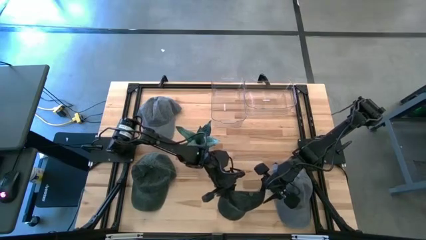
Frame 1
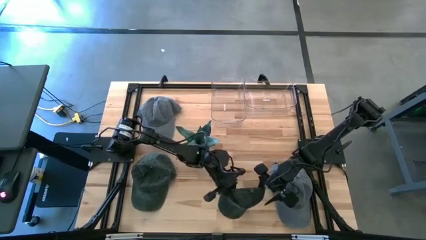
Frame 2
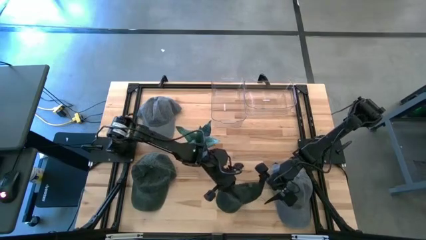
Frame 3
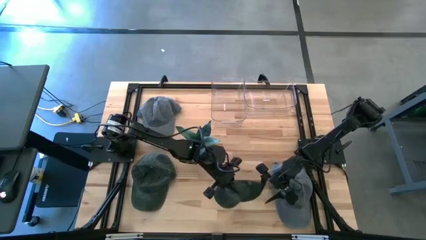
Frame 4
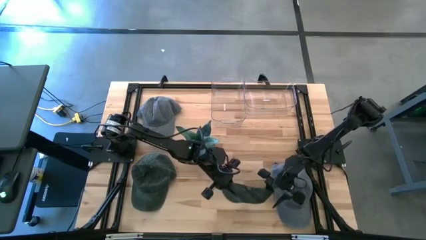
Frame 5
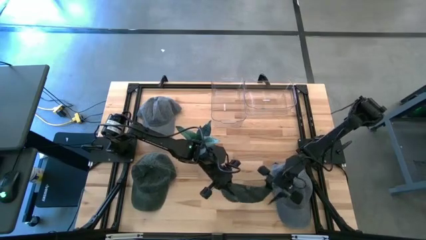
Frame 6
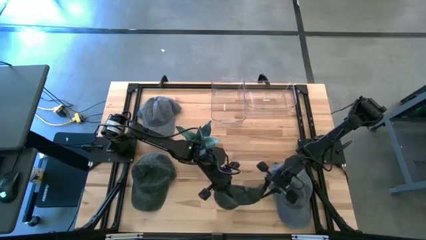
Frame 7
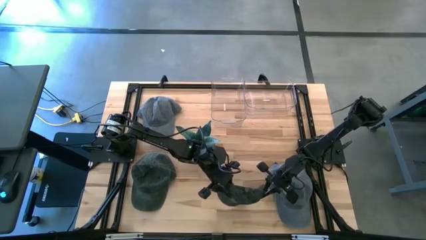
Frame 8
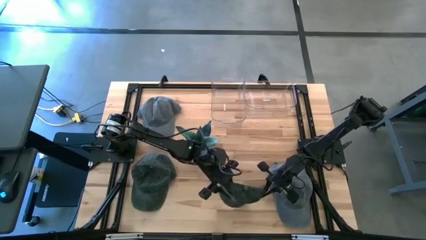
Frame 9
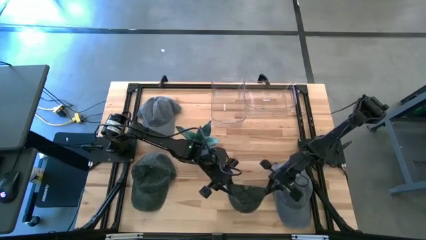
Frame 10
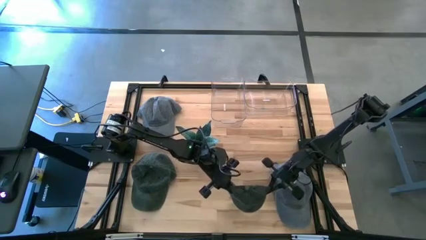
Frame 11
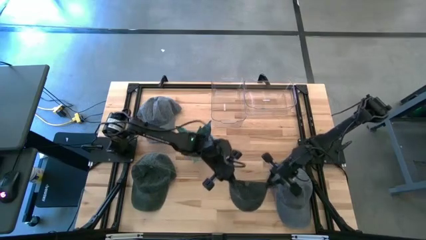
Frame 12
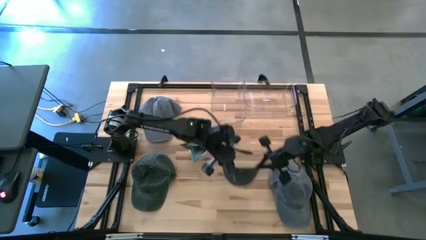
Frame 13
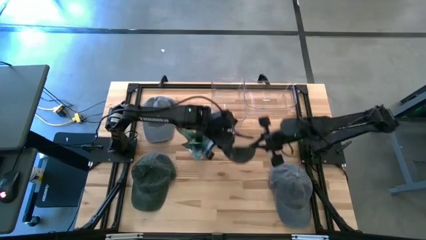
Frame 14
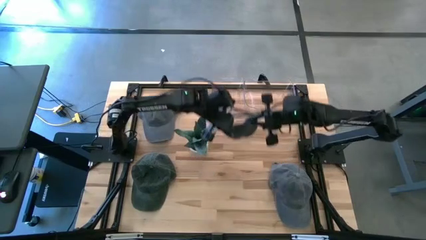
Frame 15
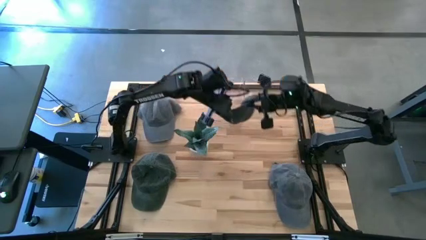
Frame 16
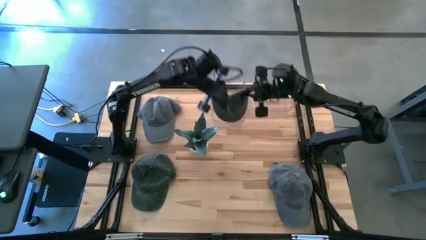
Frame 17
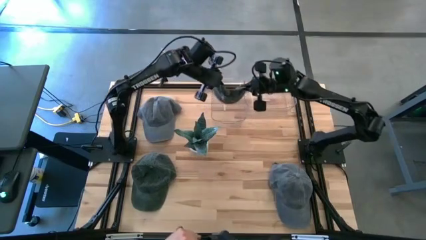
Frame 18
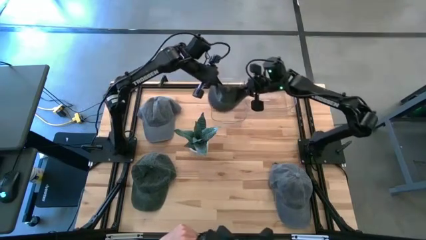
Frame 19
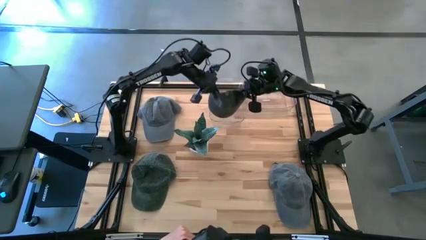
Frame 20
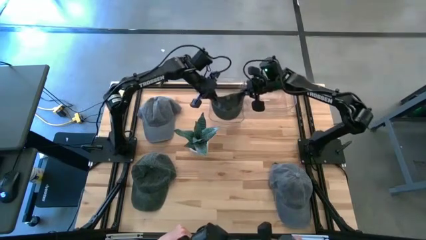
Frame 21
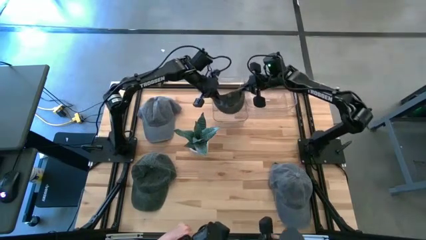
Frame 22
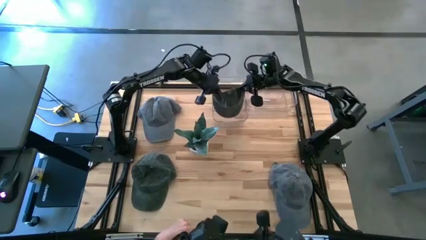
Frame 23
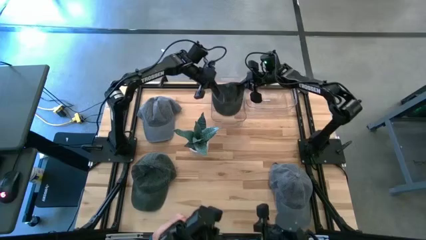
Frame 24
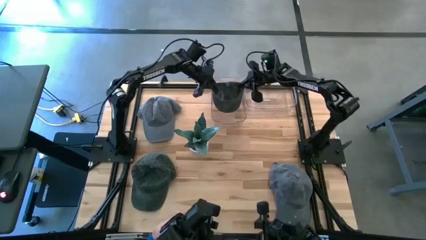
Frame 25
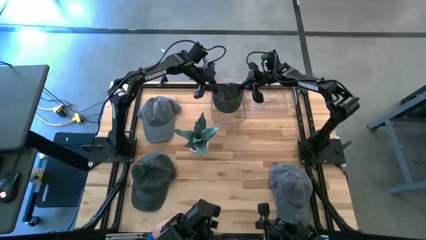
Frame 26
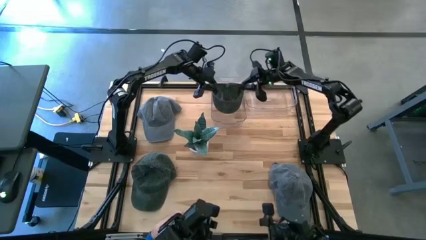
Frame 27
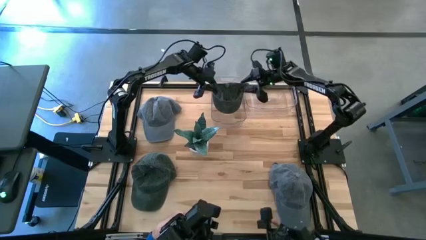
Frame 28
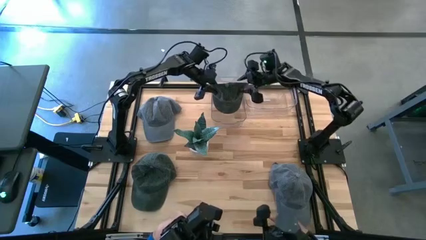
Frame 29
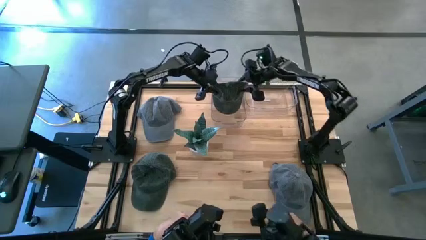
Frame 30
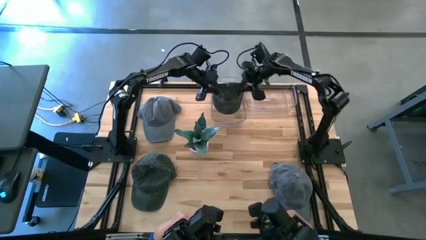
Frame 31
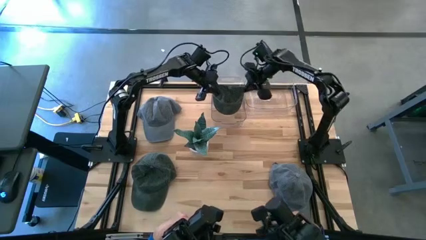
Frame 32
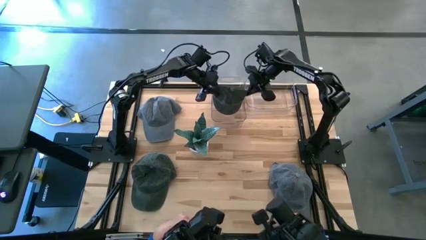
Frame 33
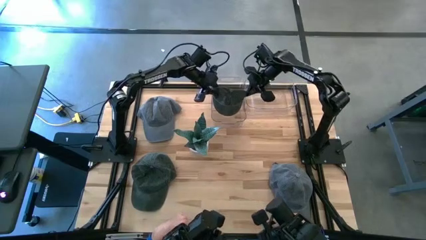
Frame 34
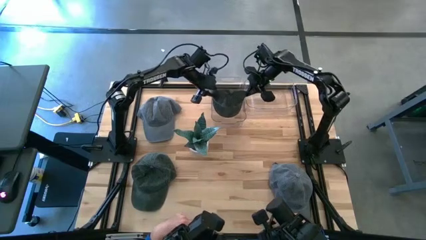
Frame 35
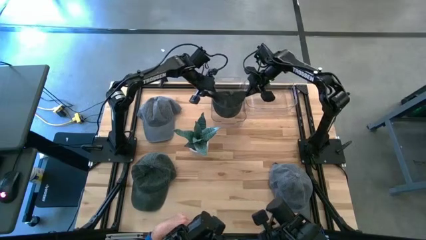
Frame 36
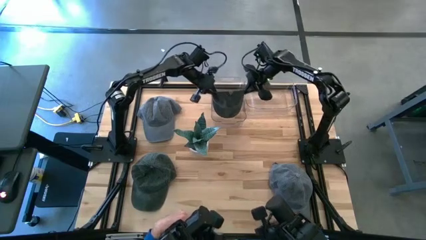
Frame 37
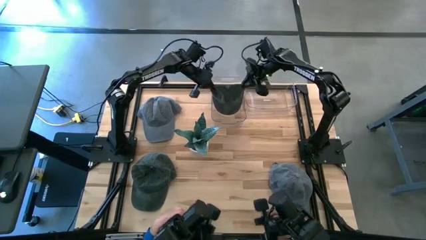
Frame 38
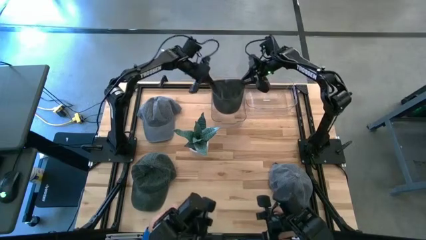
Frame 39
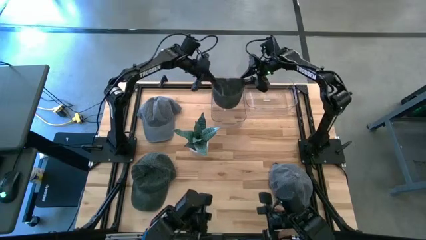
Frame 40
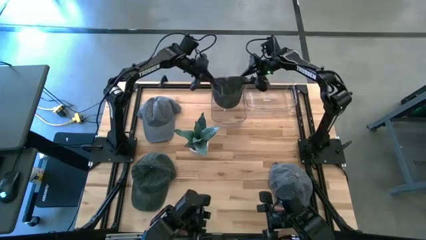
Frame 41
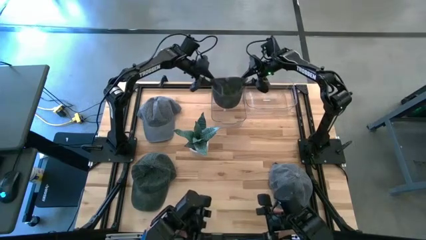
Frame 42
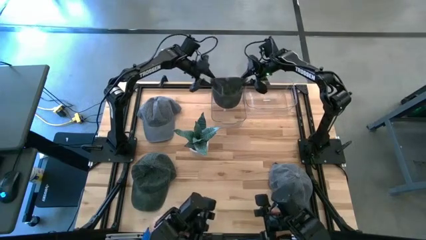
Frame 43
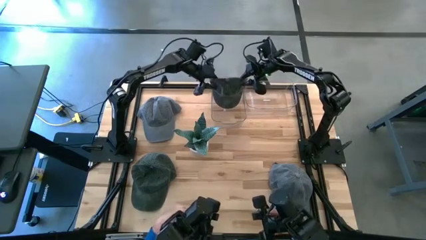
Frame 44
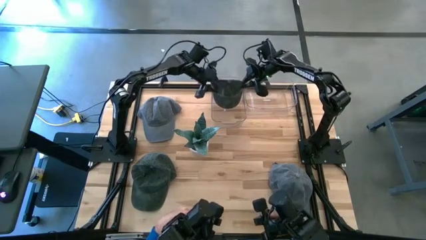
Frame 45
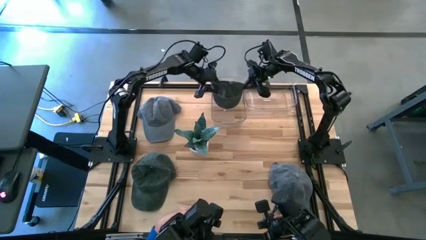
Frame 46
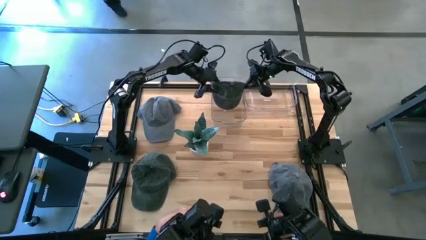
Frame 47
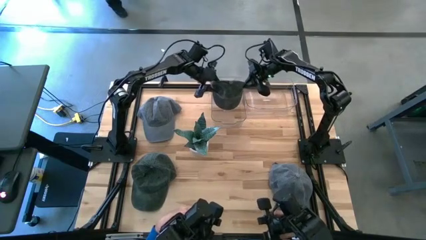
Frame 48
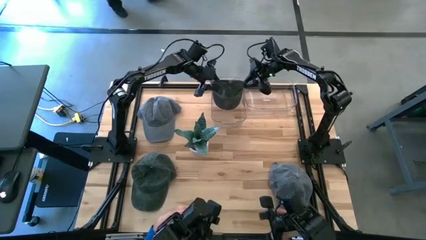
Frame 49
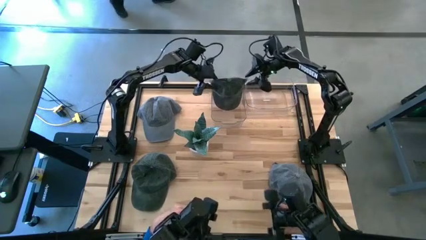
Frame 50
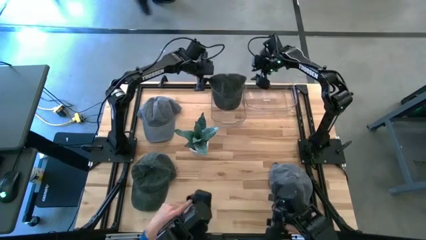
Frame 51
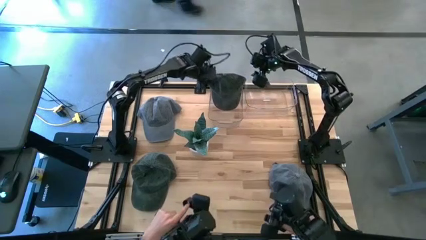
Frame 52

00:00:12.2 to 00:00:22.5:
Task: Pick & Place hat
Put the right green cap into the left transparent bin
